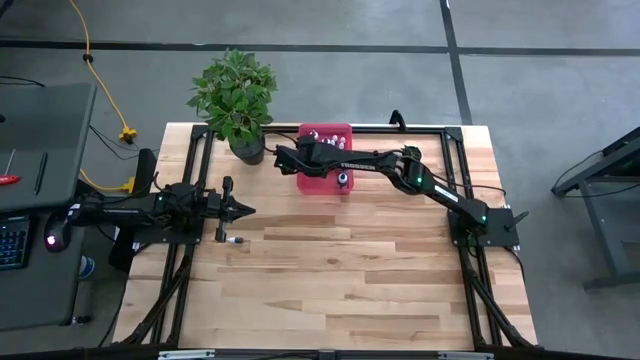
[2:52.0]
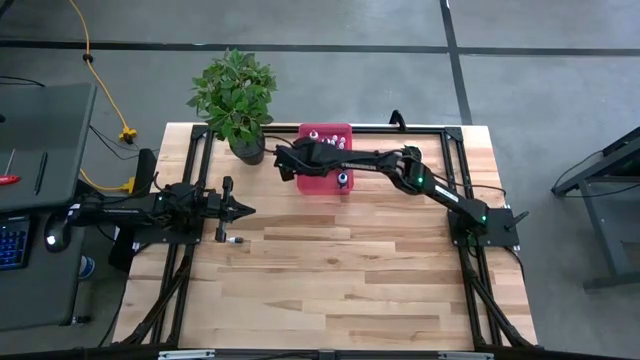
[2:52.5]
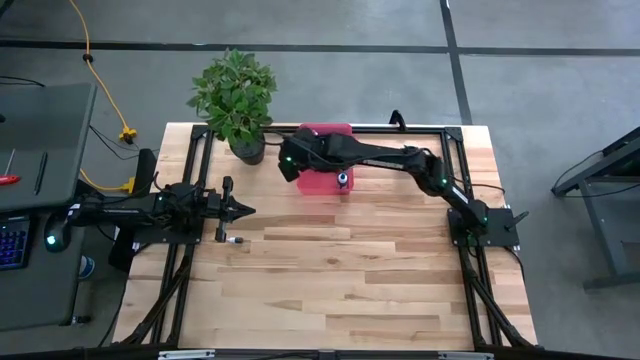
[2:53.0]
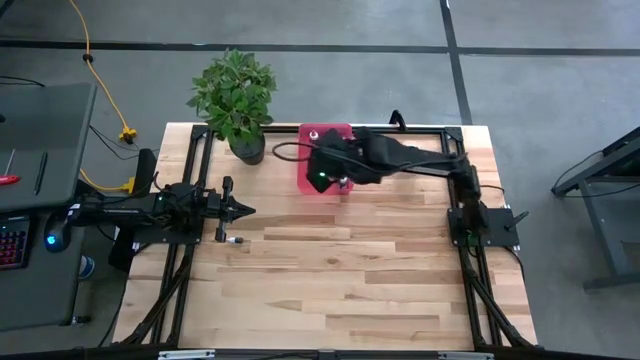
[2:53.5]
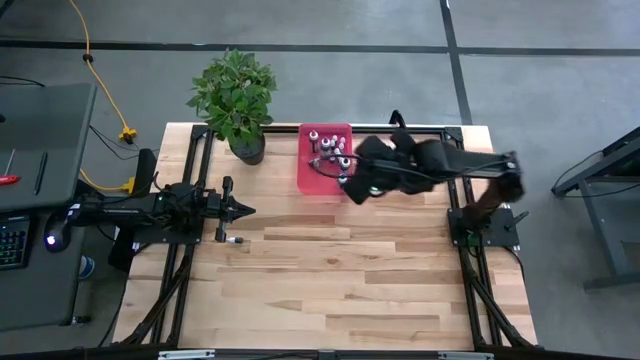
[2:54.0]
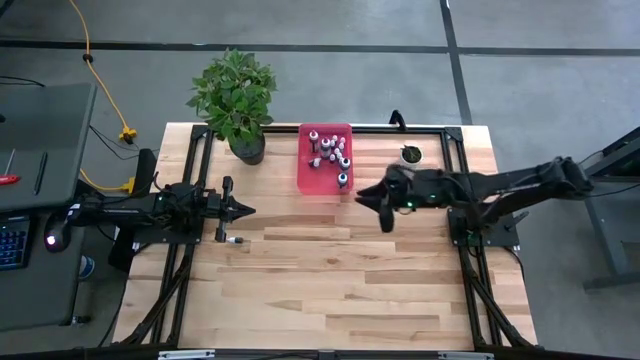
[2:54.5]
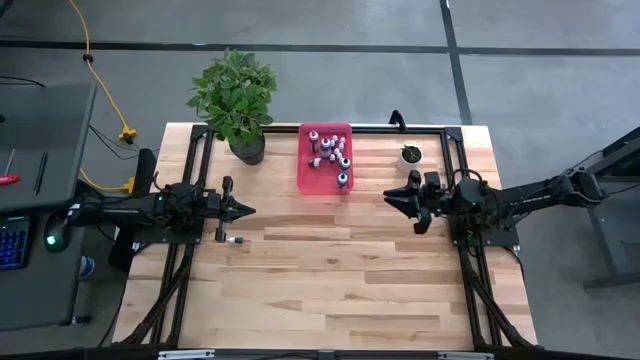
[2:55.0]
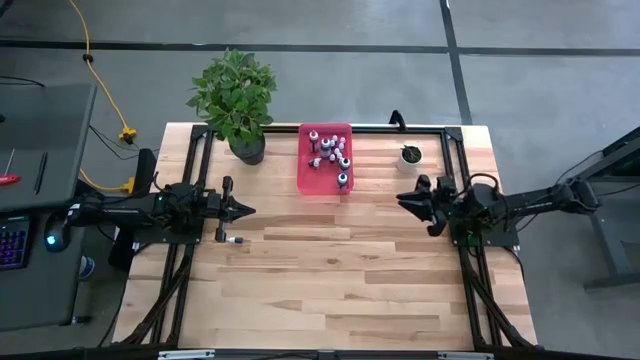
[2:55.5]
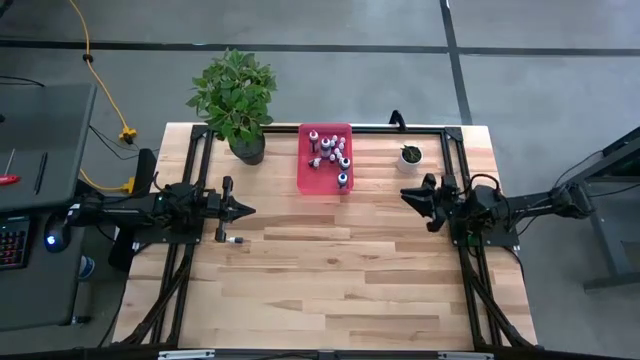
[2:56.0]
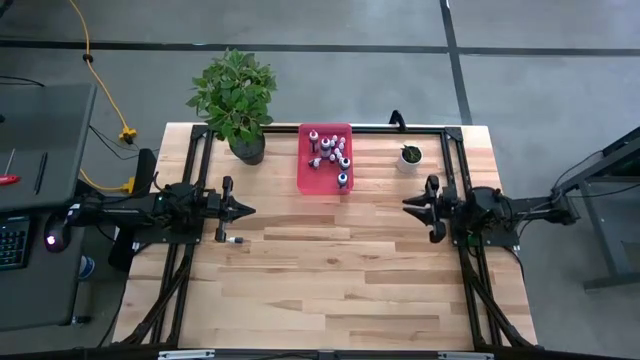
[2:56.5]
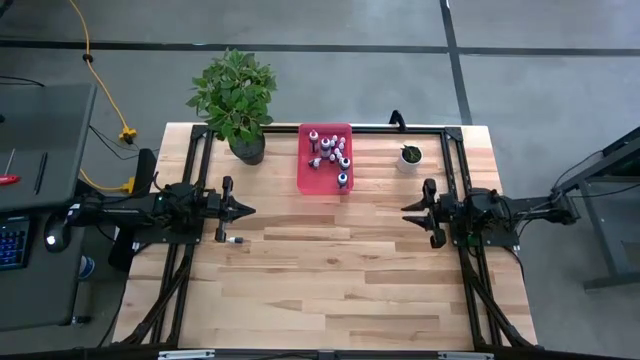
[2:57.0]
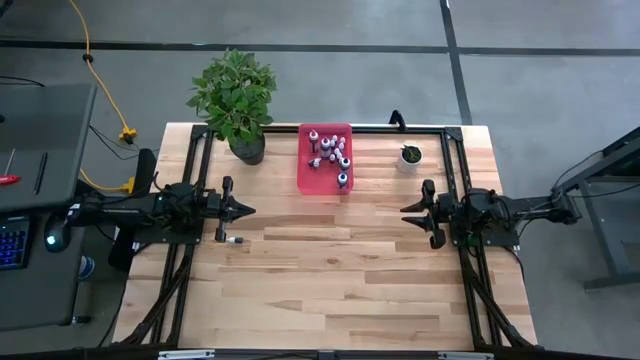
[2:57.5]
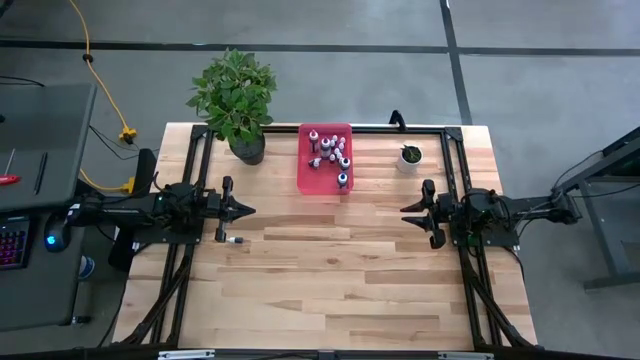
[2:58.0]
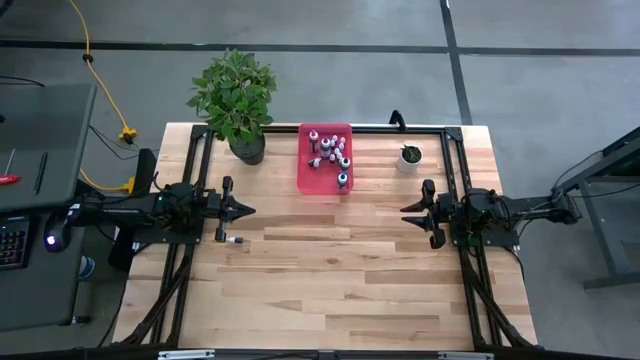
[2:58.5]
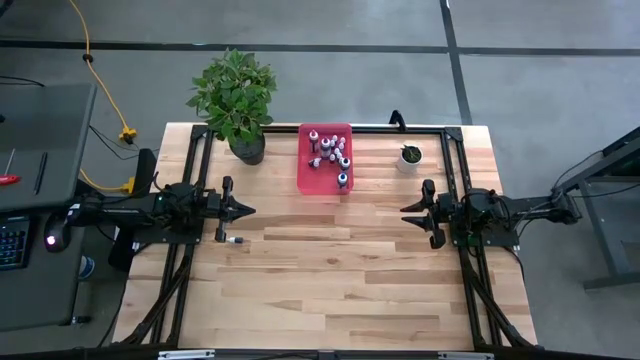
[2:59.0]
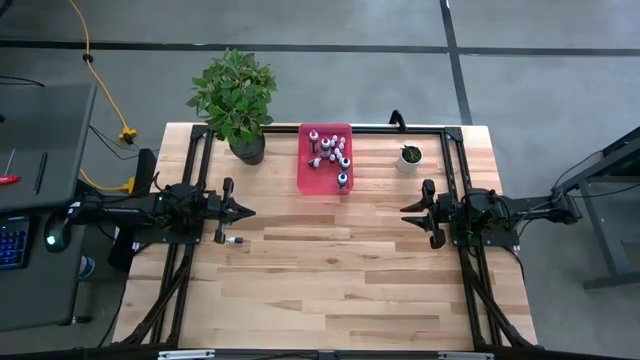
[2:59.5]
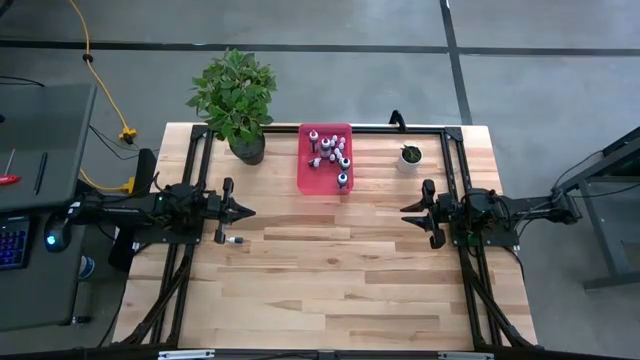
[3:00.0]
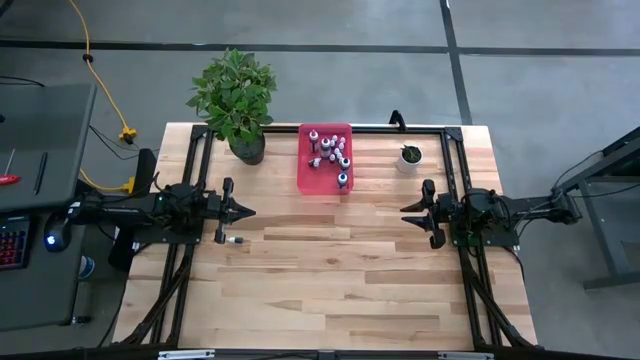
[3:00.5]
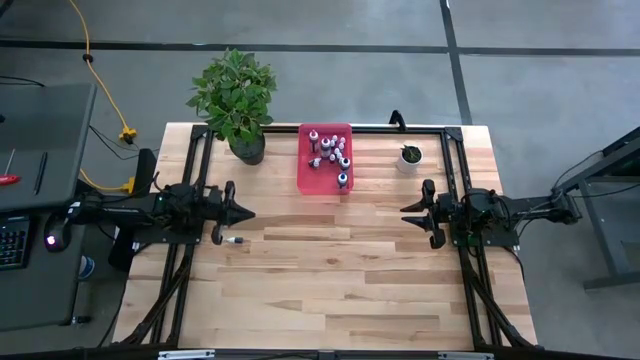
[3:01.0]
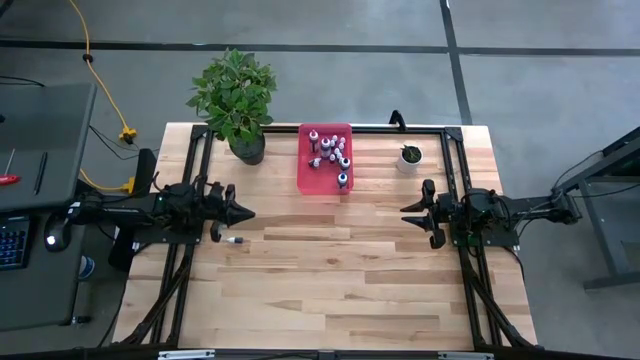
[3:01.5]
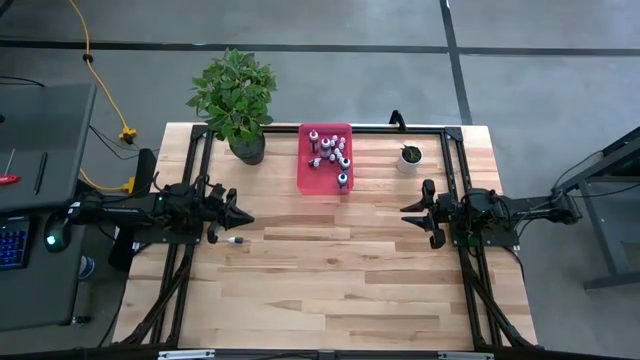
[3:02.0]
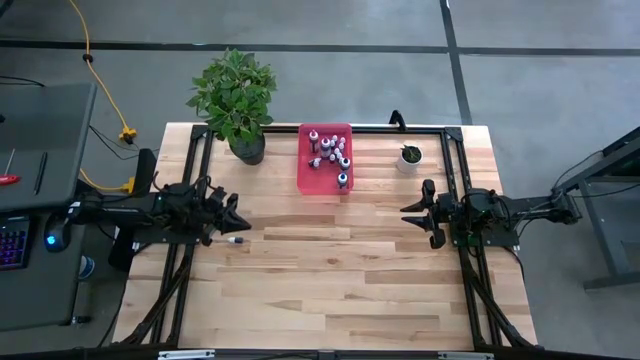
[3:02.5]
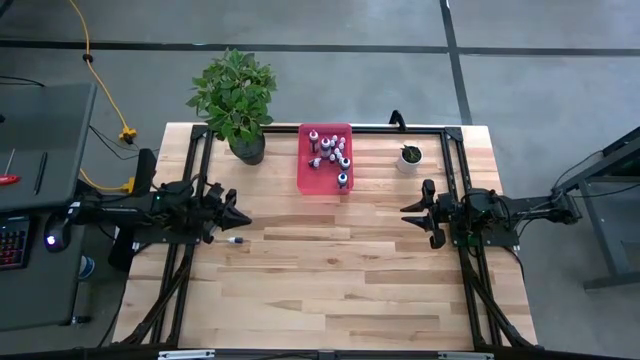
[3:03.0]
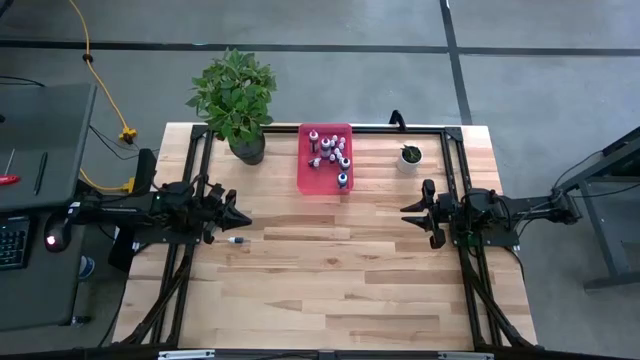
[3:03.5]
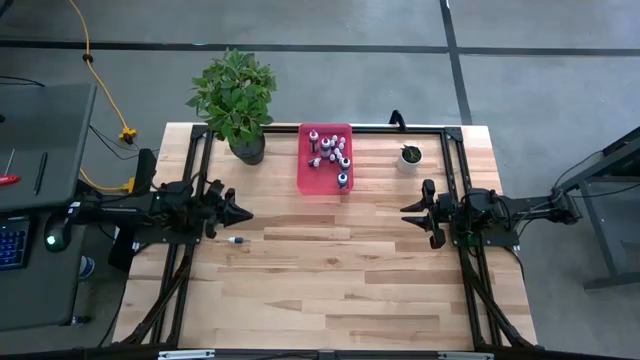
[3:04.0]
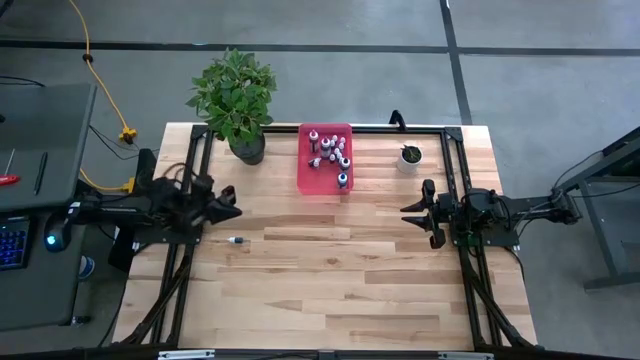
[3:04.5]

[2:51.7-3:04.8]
Task: Pick & Place food coloring
Put the black food coloring bottle into the pink bin
